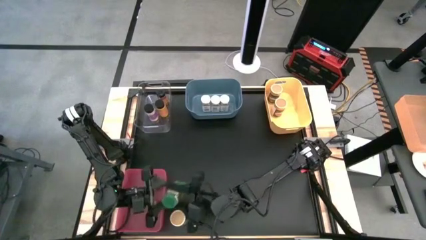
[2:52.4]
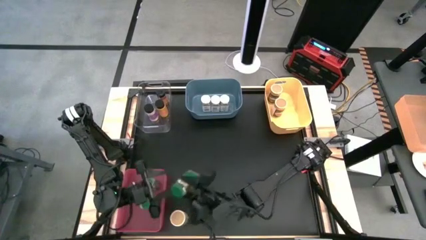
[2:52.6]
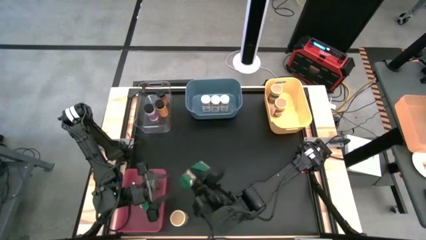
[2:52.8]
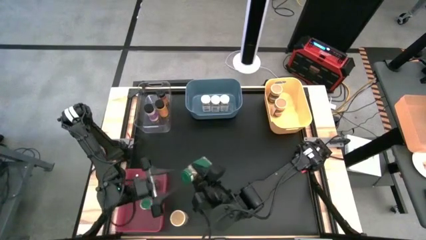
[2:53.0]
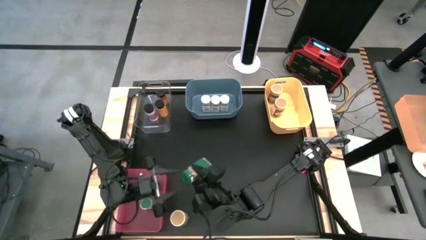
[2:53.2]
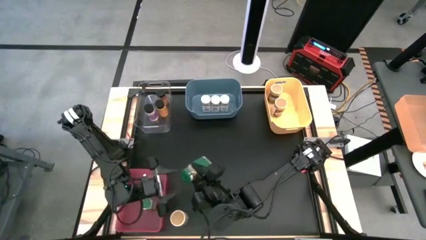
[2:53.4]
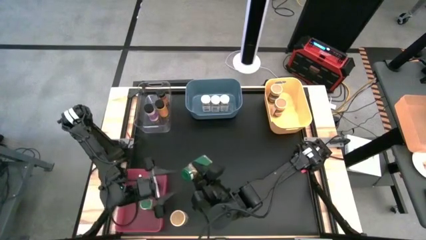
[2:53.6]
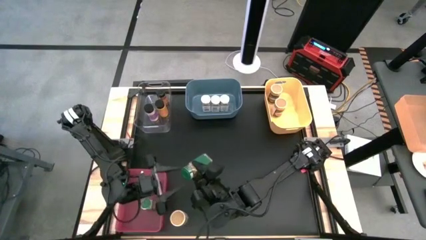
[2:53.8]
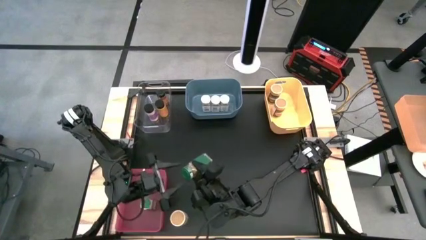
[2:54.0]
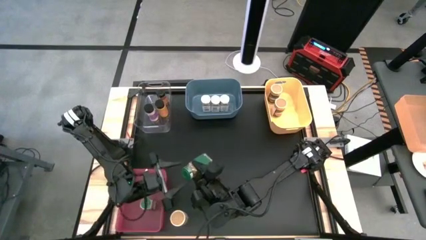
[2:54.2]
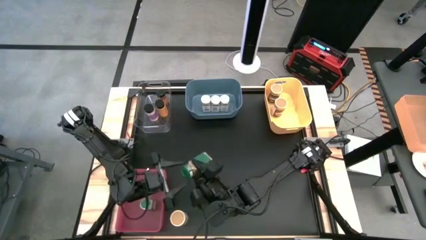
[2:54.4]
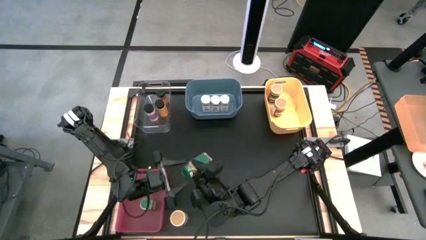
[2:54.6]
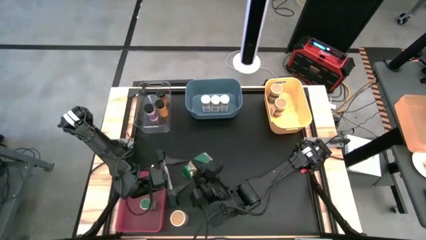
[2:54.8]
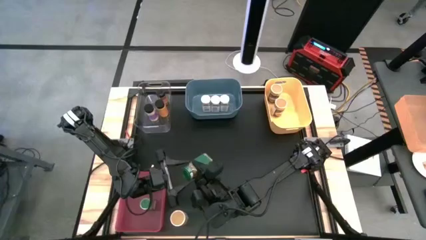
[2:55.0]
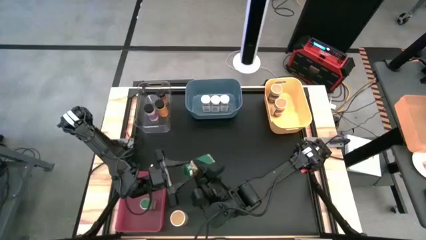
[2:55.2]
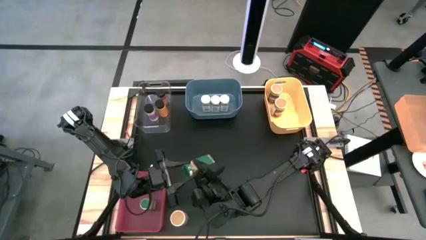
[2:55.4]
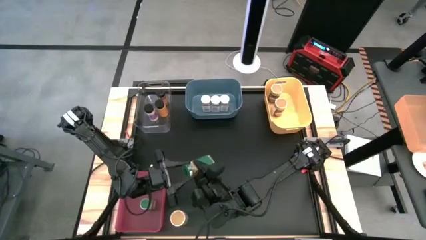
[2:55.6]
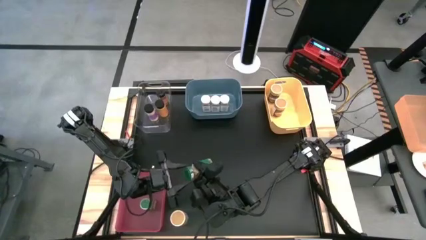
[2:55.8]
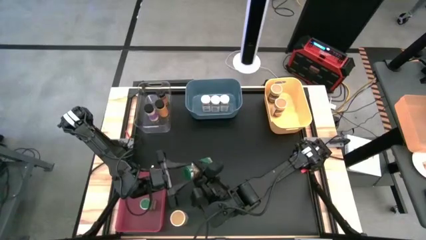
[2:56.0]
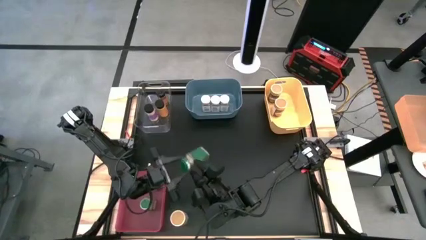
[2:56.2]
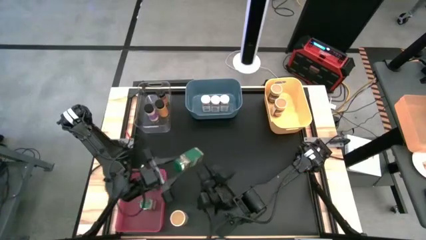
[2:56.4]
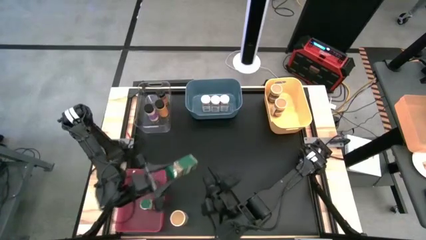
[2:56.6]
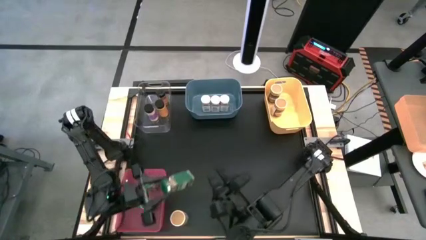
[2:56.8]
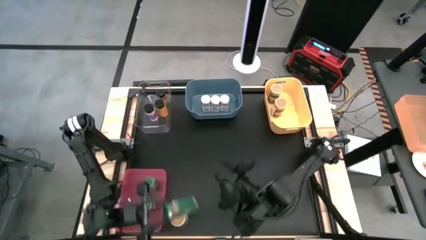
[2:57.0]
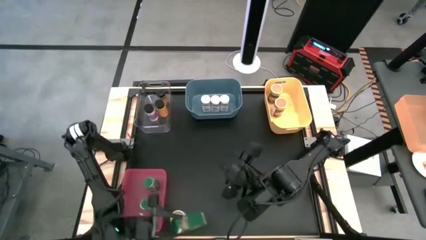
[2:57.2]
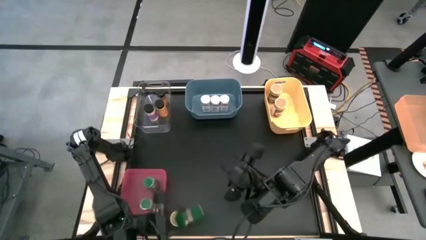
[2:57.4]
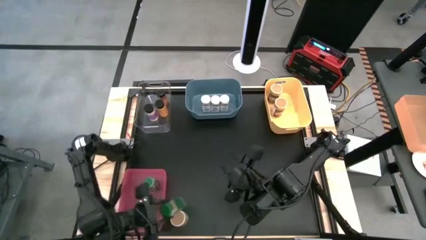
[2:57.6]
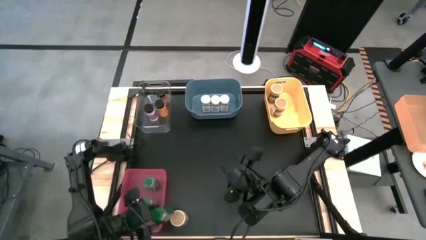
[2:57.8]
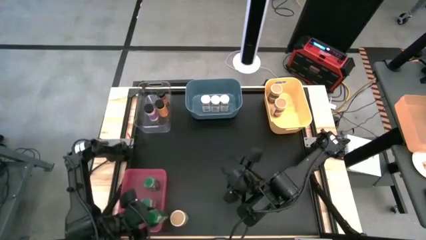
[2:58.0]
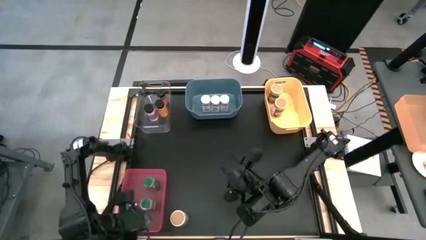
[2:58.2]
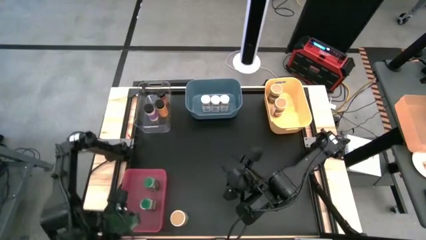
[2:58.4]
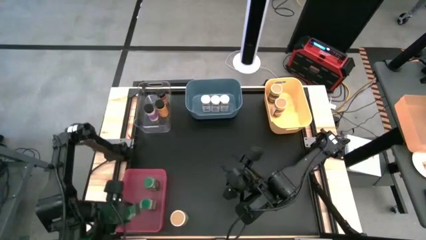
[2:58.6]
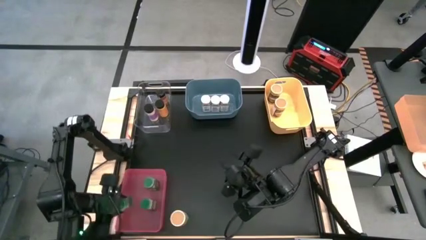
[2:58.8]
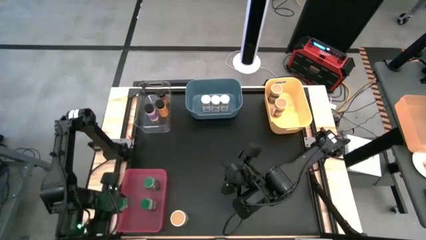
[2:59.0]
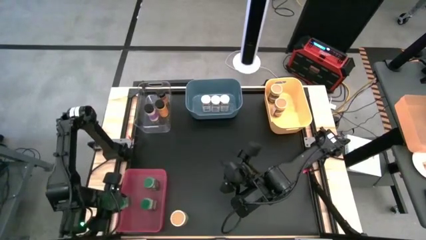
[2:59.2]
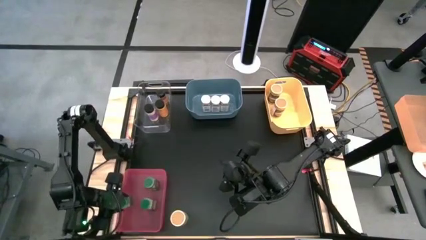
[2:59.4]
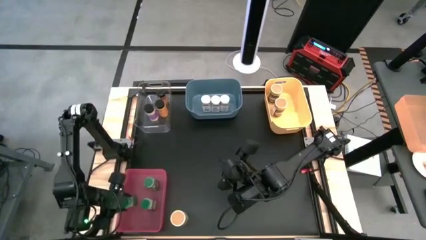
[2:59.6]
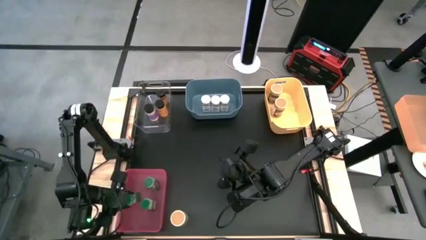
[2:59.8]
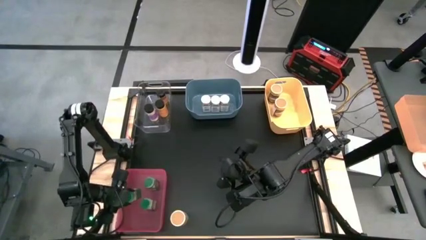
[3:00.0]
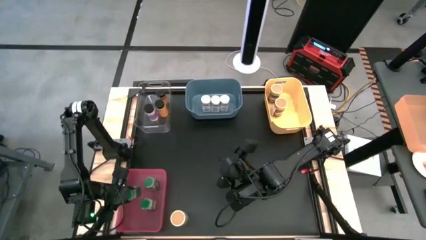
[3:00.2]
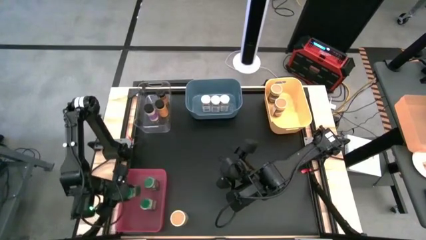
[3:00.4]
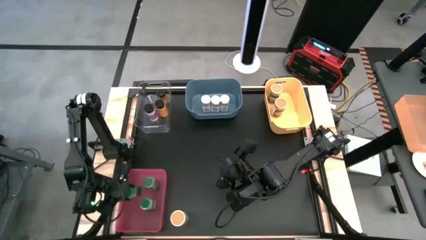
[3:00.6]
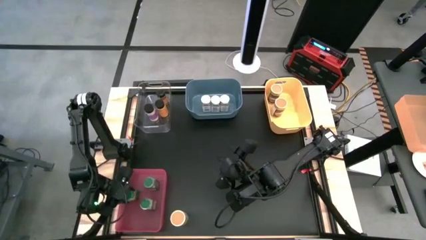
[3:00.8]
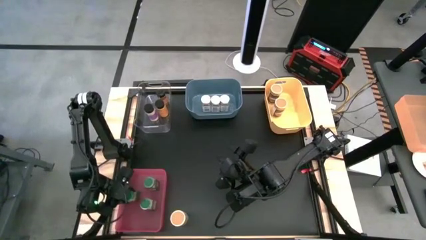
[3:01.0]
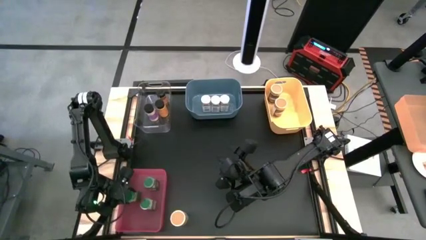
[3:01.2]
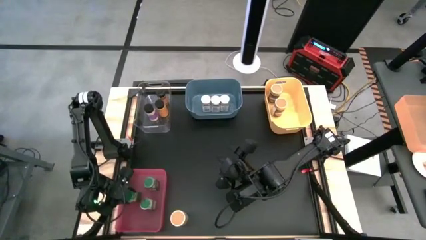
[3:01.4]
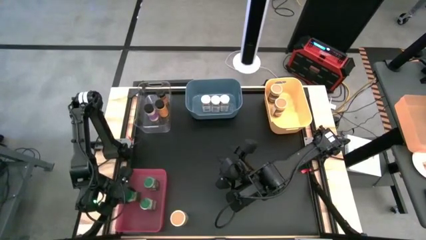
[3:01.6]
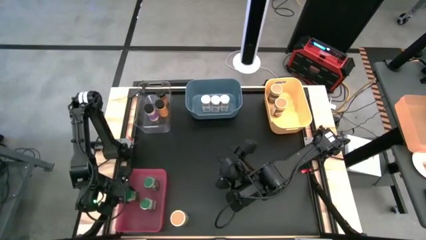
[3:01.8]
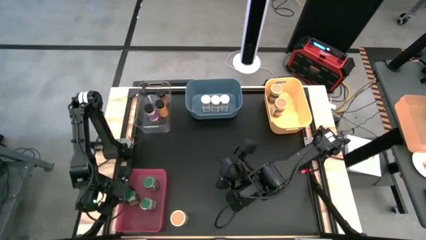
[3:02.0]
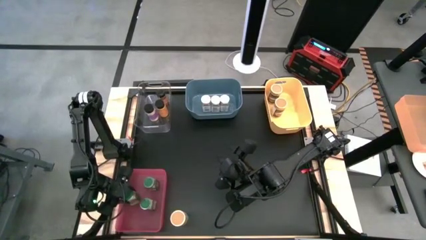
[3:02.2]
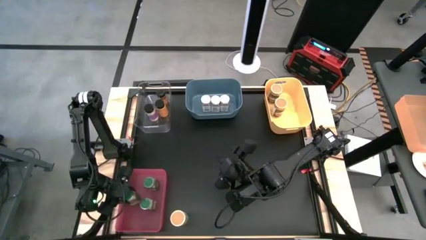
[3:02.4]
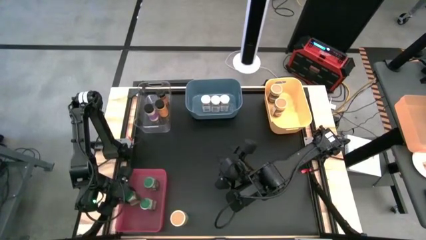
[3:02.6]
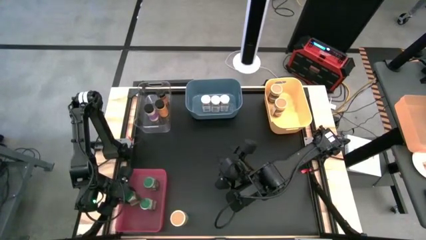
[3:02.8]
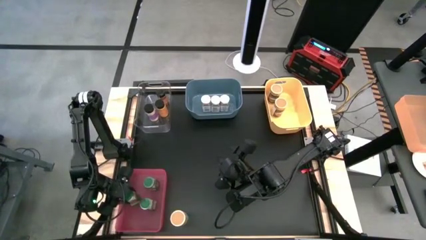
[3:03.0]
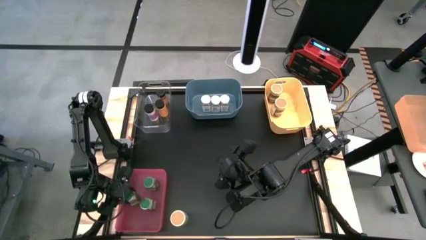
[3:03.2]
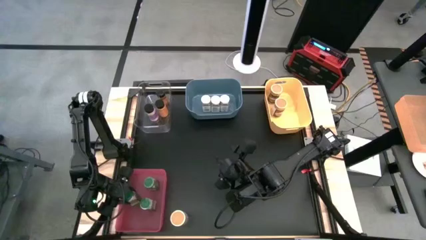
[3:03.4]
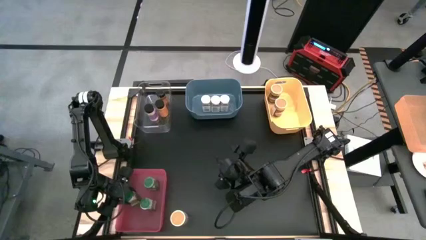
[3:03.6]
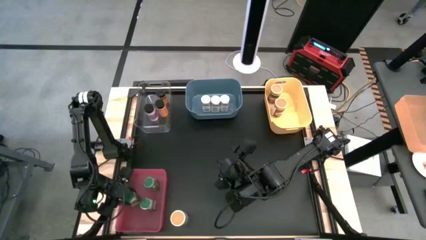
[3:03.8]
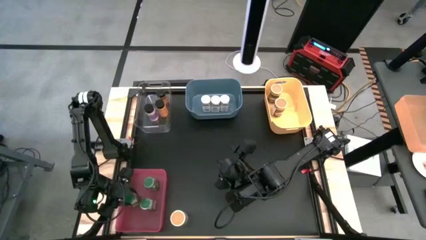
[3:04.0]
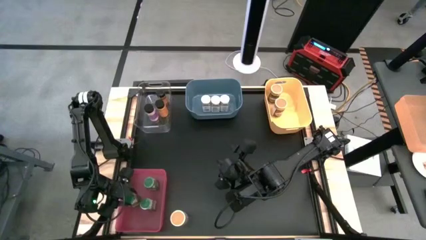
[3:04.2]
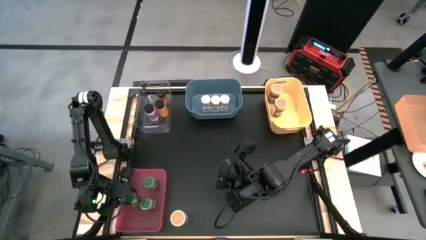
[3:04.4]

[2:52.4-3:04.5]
Task: Sort spices by type
Put the green seasoning bottle into the pink bin

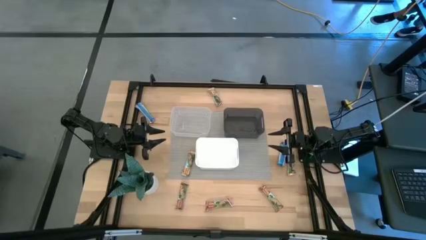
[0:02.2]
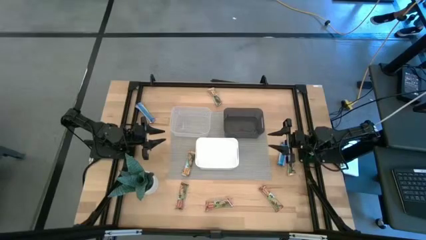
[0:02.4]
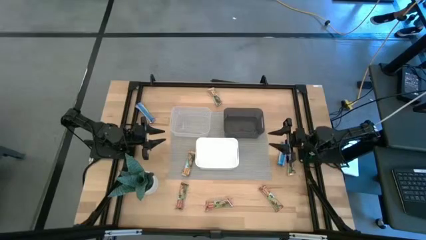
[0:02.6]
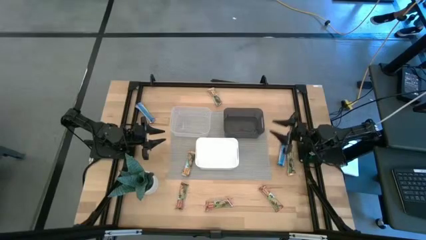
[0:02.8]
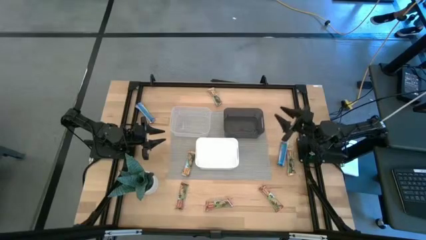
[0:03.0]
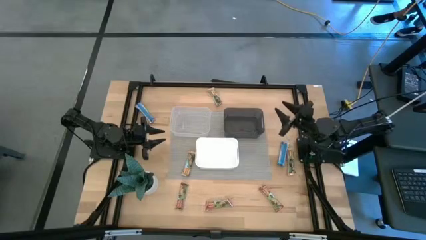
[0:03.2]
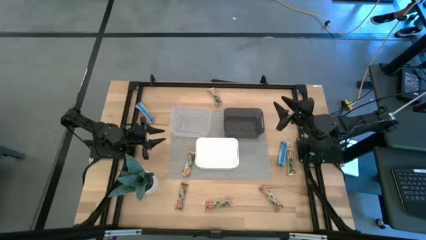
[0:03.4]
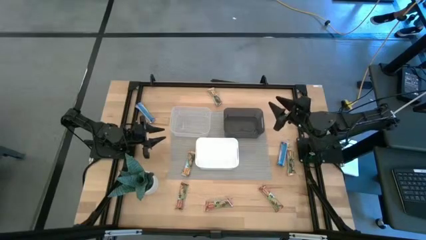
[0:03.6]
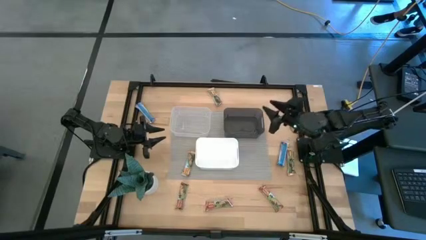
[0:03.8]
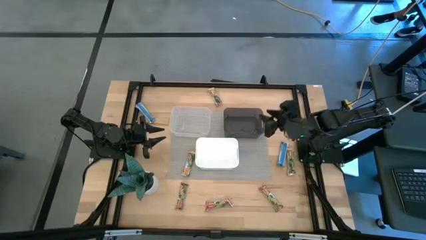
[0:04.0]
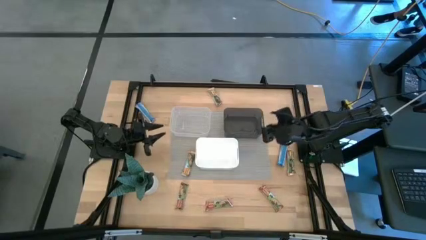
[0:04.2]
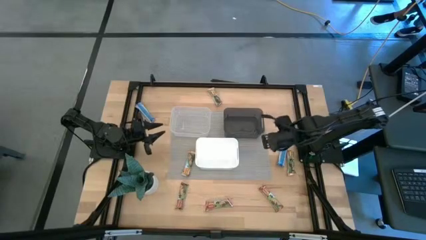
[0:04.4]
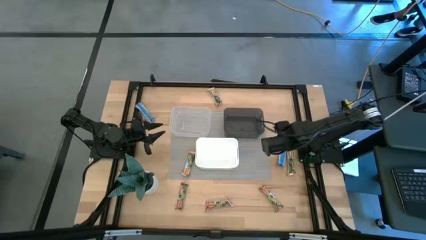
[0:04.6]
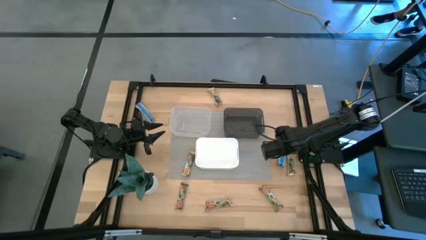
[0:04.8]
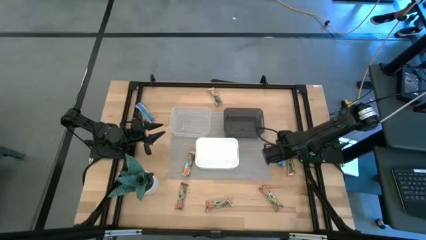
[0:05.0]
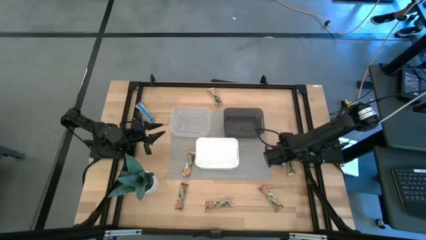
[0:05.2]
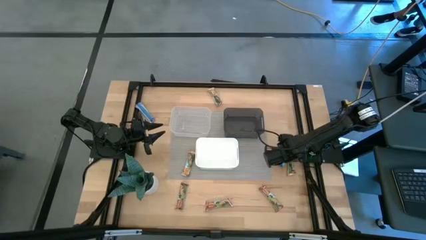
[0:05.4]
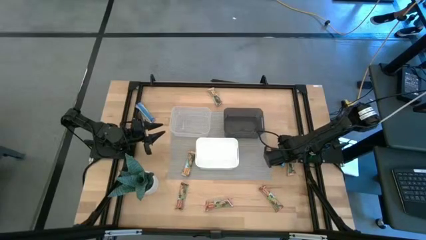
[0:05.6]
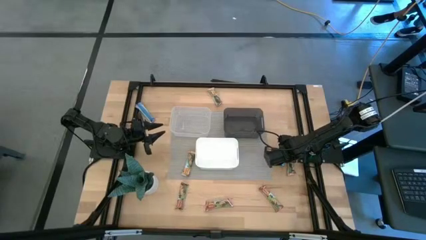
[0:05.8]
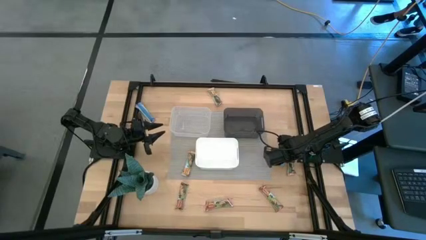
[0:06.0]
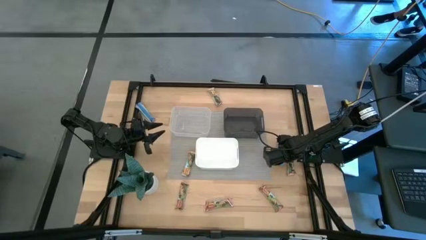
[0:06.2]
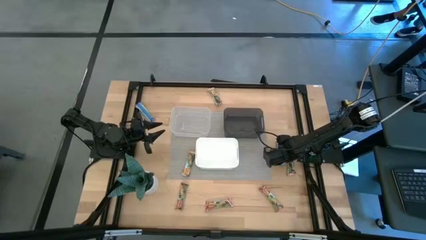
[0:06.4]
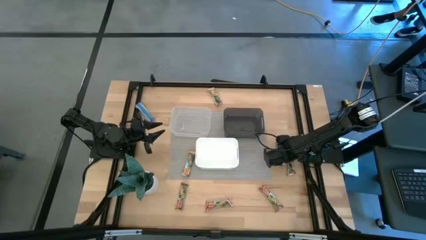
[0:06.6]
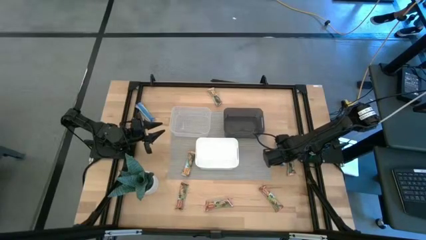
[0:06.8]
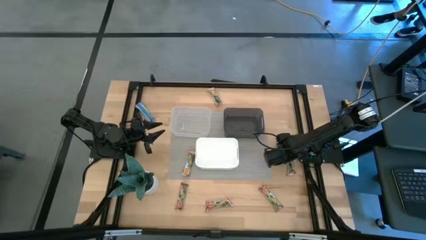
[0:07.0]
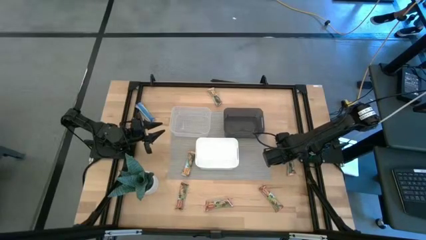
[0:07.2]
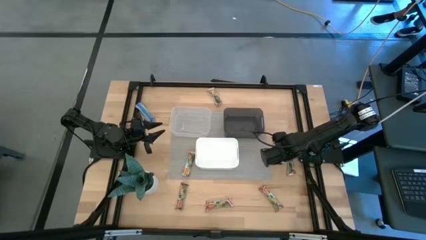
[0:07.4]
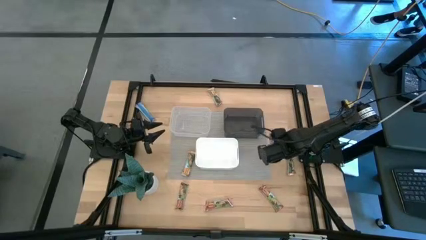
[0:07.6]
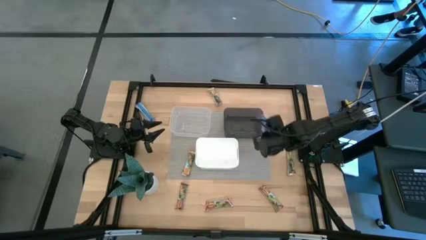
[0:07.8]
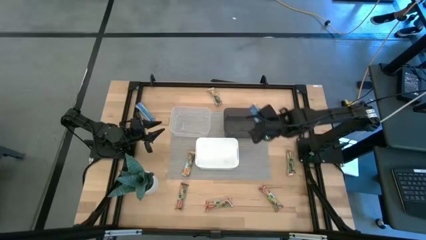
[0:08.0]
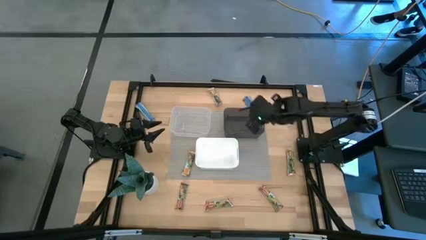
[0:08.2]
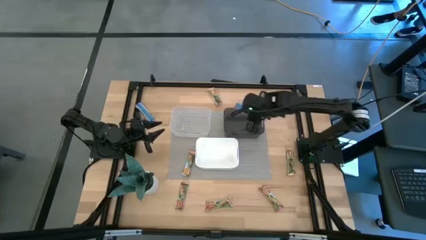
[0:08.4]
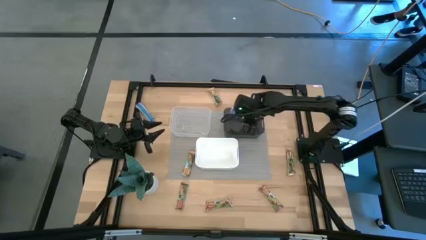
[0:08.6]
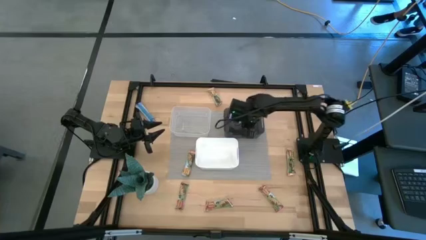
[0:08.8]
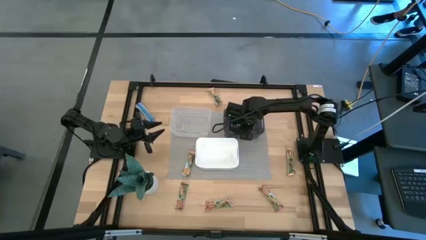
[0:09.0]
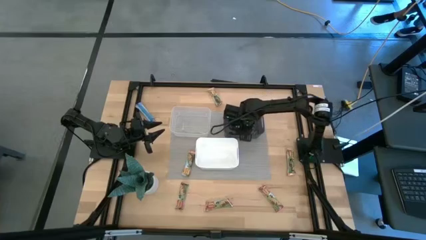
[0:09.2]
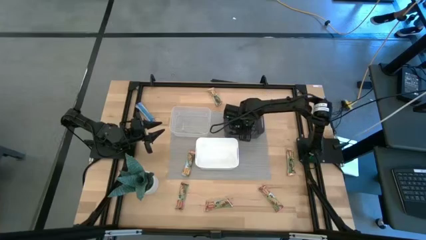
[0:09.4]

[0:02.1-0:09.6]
Task: Pick and place Granola Bars by type
Put the right blue granola bar into the black bin
